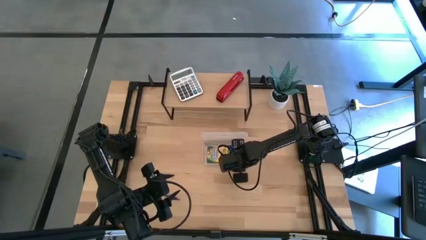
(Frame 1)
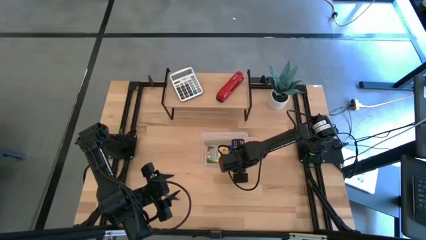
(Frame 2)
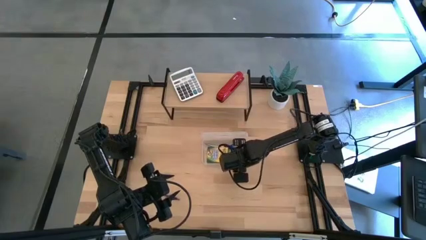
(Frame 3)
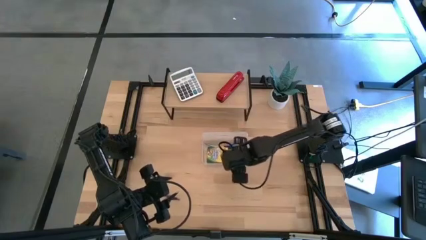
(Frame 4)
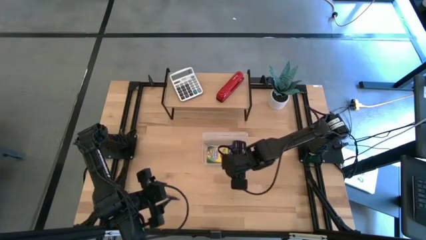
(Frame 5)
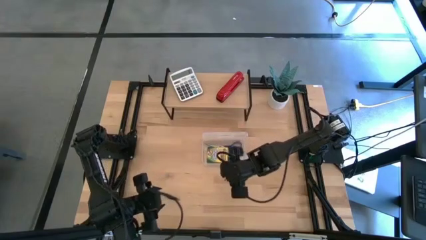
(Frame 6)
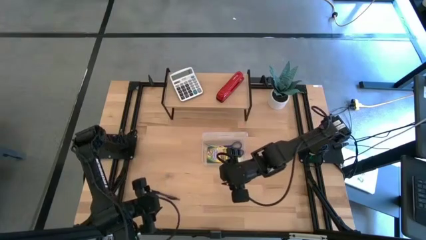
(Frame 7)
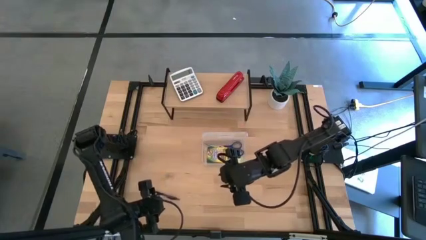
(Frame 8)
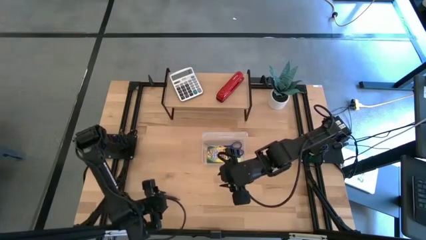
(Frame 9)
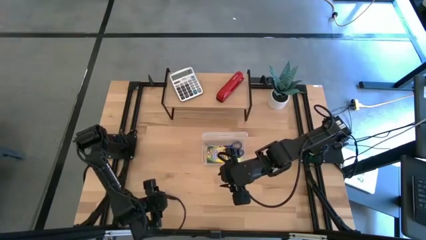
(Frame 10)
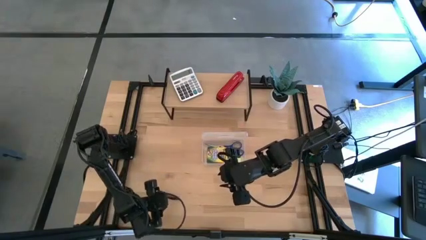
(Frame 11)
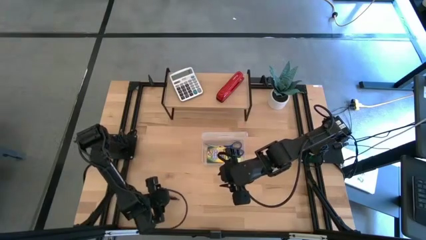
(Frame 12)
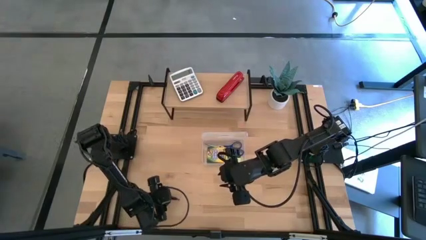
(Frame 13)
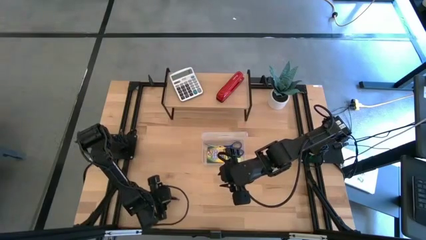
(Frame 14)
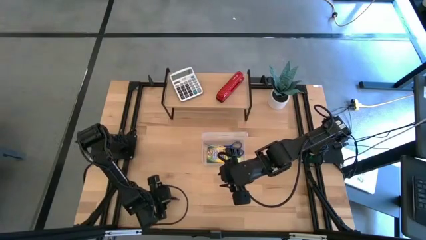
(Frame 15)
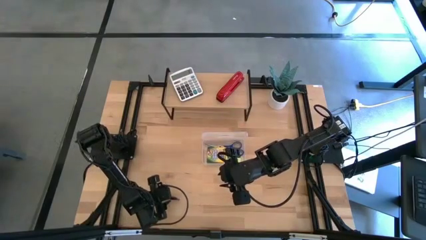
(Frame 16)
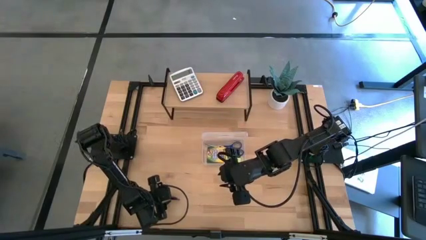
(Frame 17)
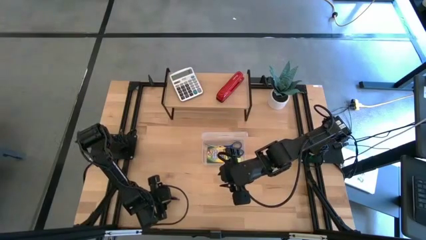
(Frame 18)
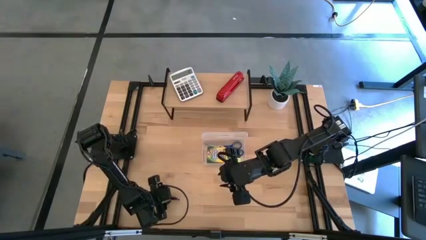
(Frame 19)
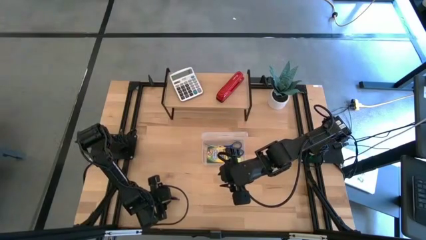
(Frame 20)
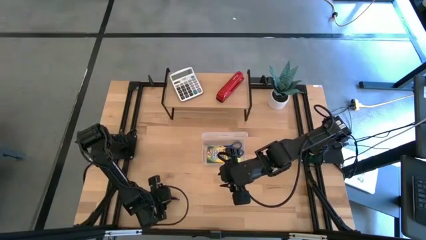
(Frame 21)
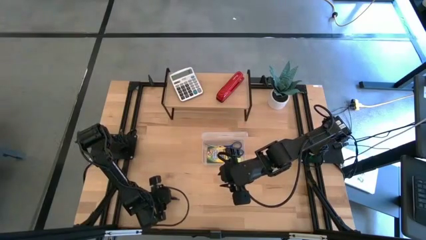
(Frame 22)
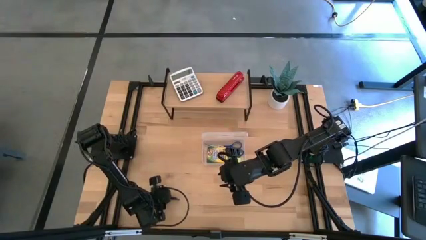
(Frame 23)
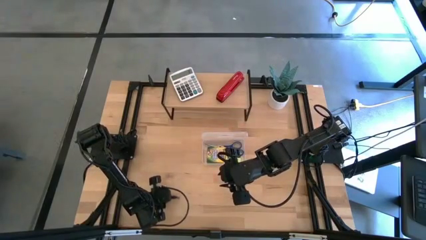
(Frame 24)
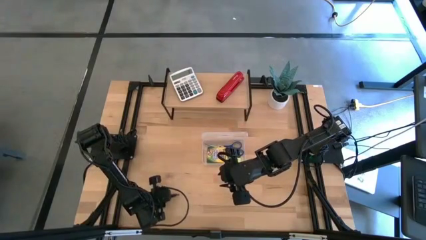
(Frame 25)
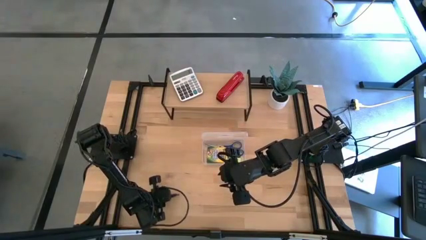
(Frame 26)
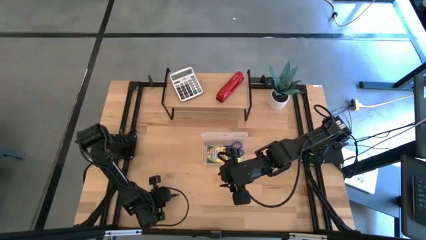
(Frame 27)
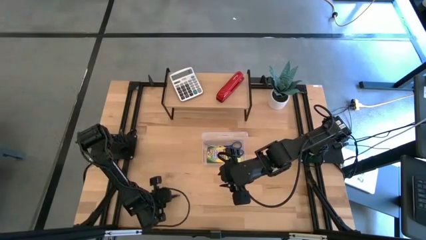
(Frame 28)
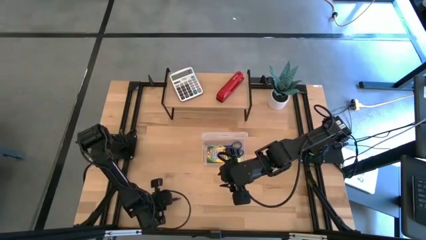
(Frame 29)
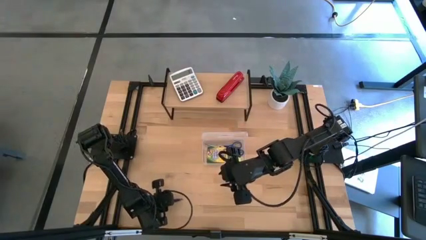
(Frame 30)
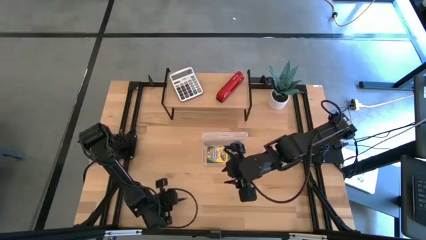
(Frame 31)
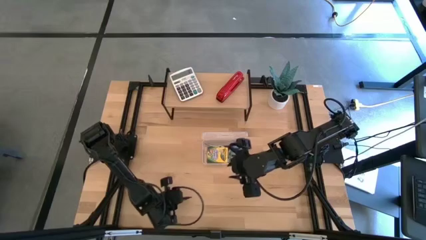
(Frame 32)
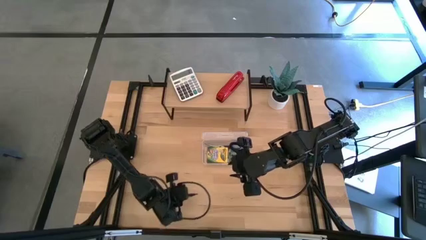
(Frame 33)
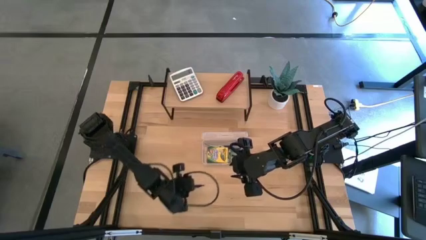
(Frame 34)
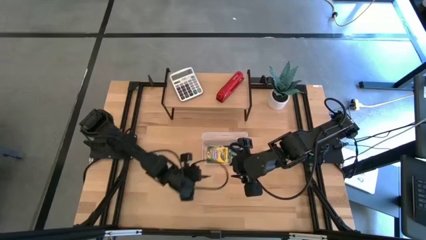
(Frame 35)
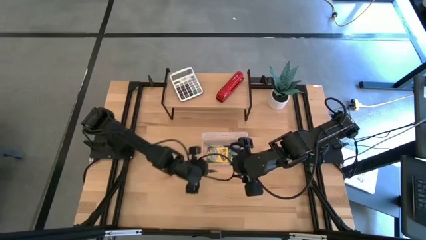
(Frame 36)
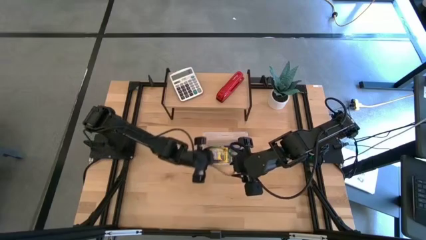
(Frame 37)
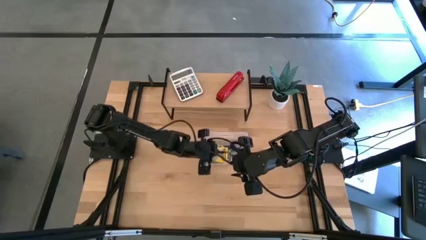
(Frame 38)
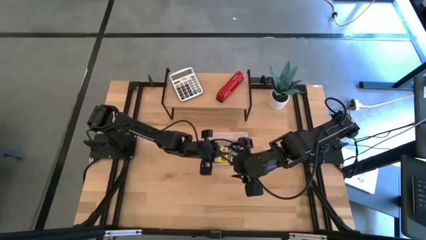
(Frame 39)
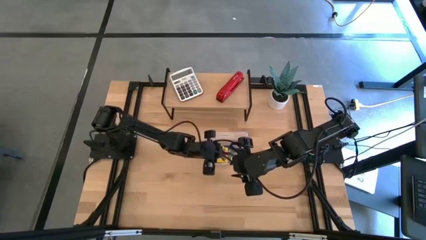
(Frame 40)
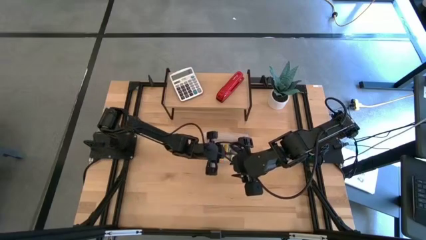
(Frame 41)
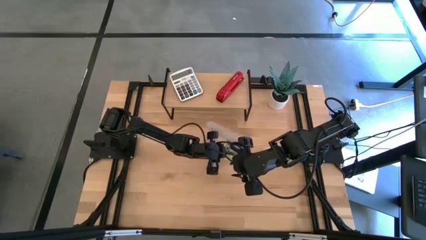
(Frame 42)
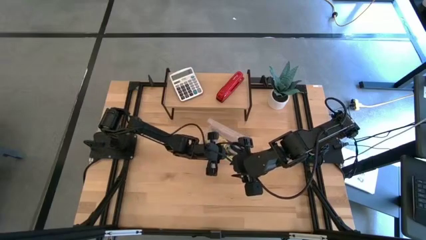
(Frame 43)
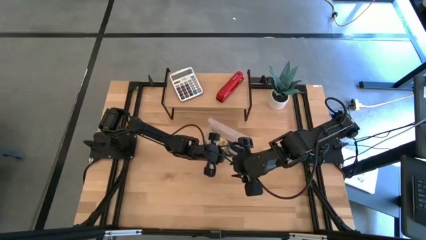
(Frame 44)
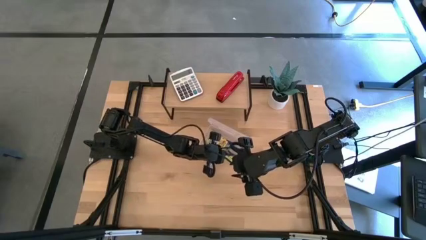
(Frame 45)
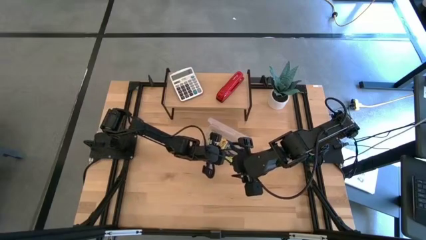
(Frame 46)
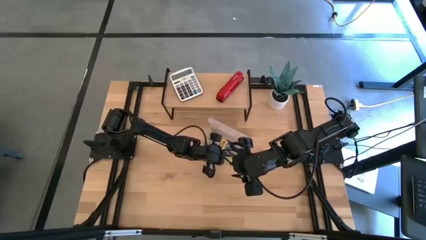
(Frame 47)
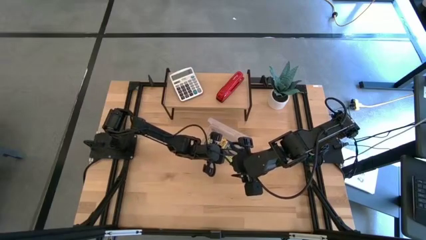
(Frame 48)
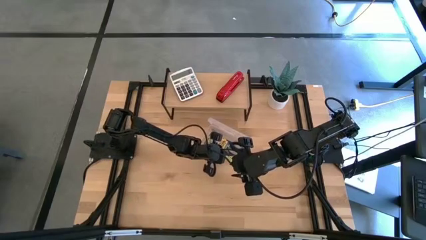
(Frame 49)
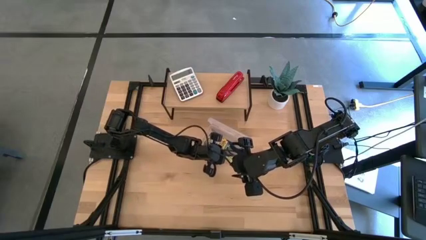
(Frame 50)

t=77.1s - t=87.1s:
Task: Pack school essentials
Put the purple pen into the transparent supply box

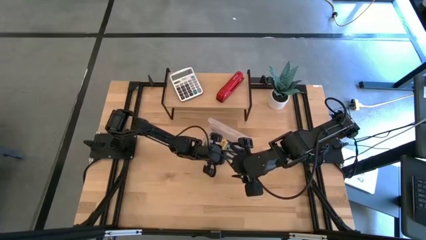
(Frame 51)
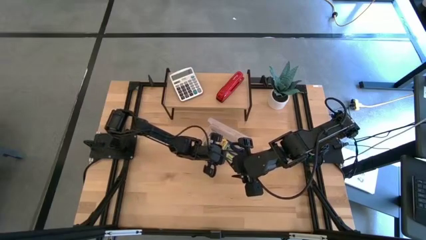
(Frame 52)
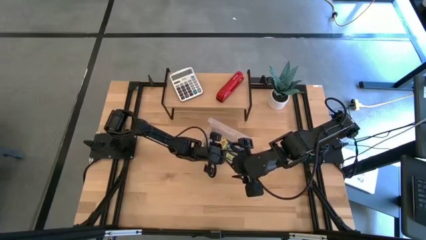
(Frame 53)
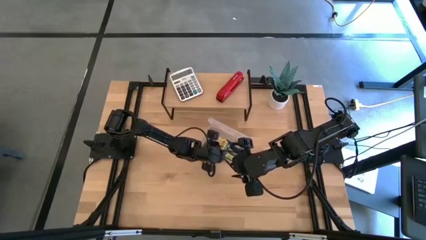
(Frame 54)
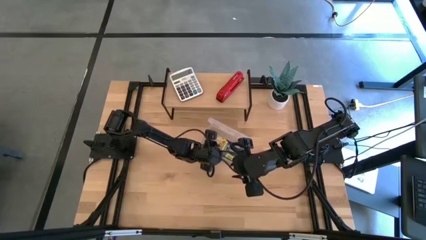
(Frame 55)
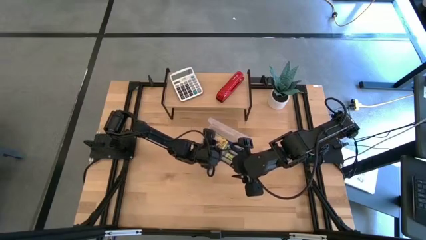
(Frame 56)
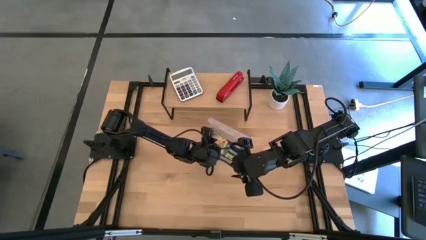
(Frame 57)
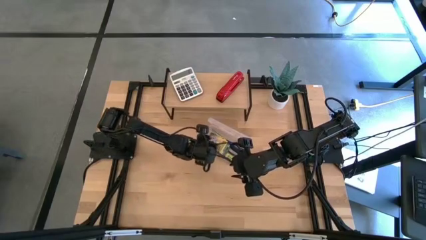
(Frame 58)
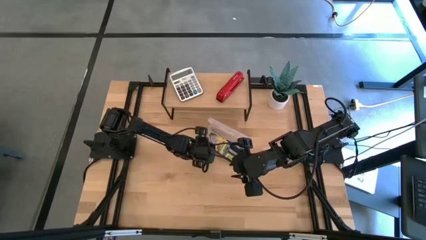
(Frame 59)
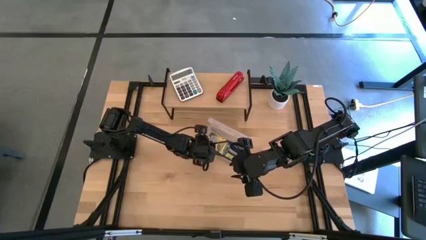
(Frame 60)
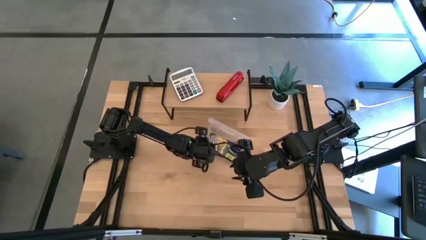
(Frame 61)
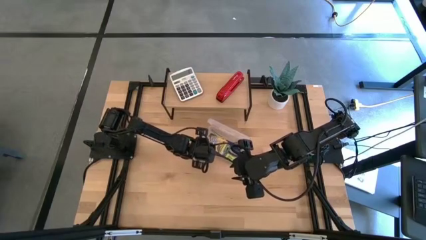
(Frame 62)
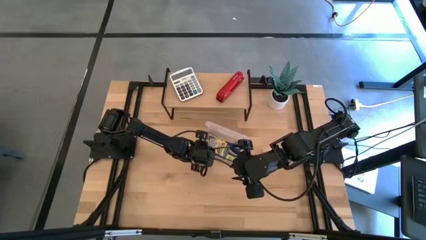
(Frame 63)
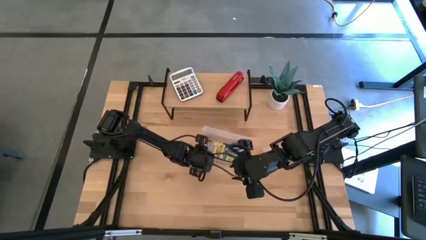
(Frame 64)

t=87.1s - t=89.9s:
Adjust the transparent supply box
